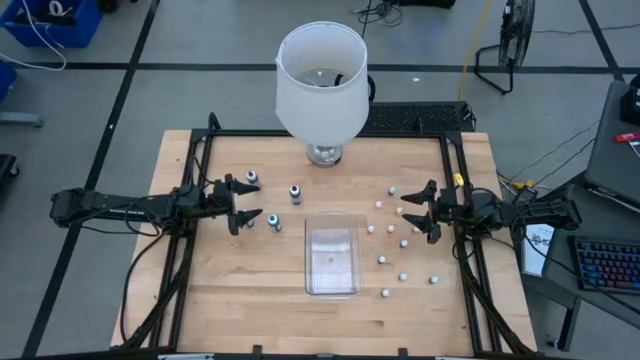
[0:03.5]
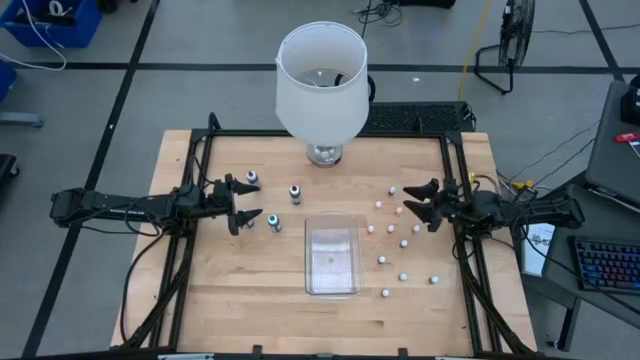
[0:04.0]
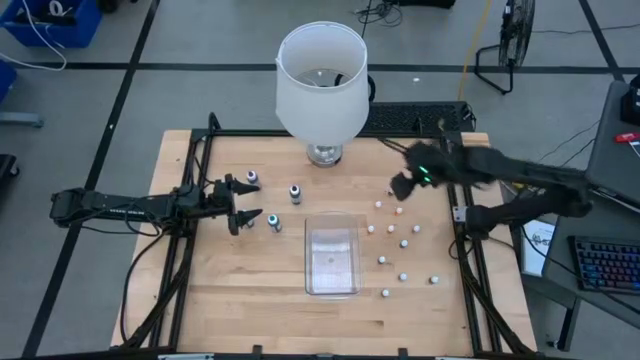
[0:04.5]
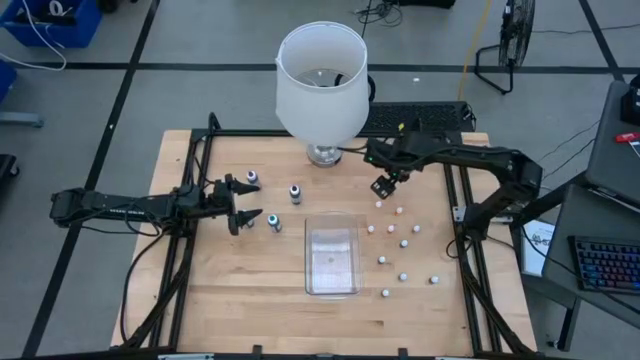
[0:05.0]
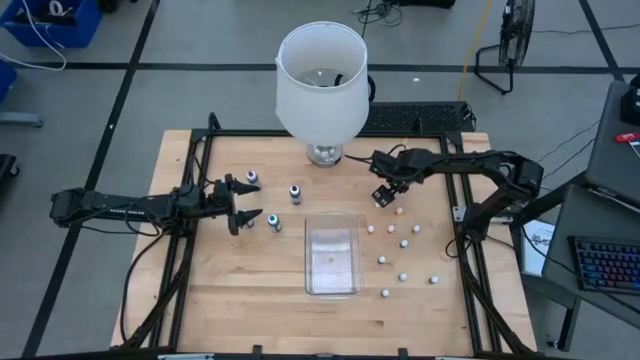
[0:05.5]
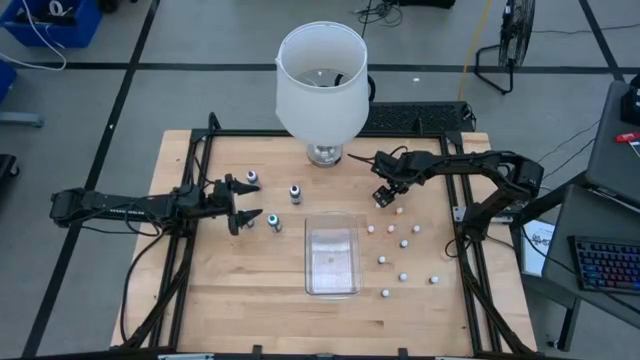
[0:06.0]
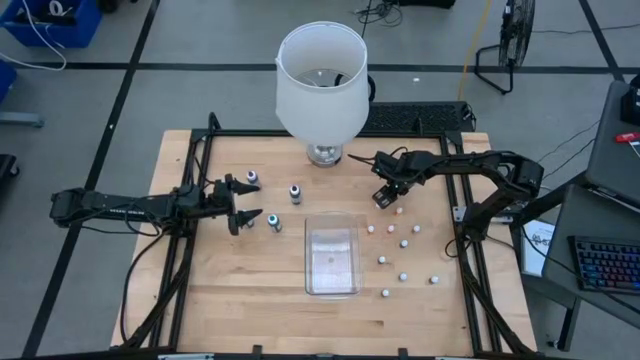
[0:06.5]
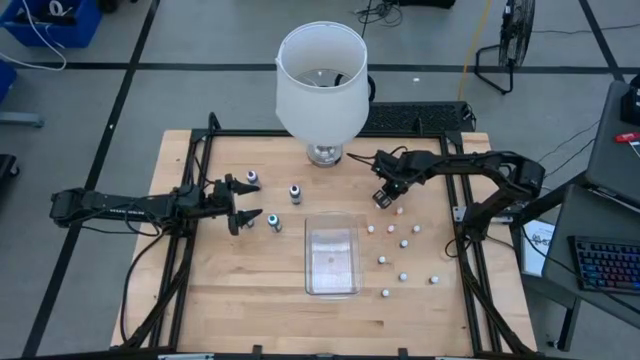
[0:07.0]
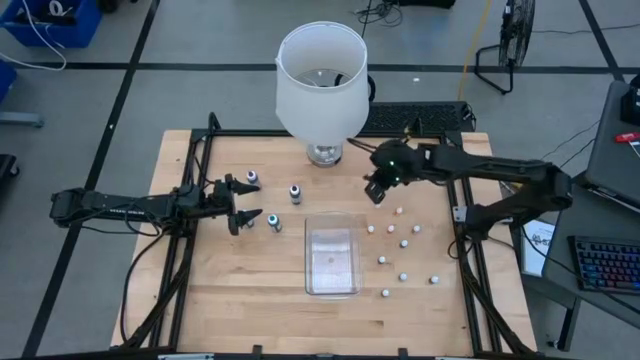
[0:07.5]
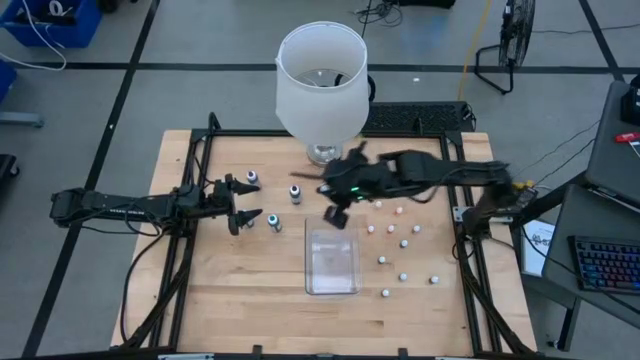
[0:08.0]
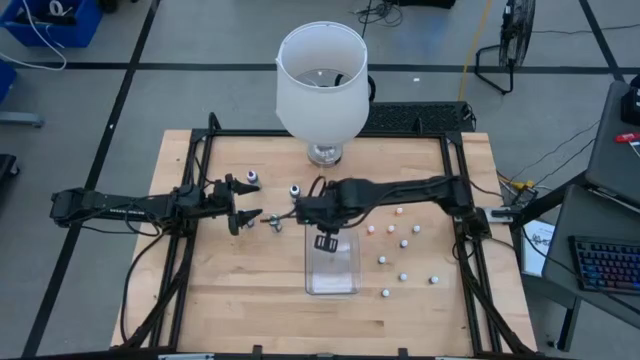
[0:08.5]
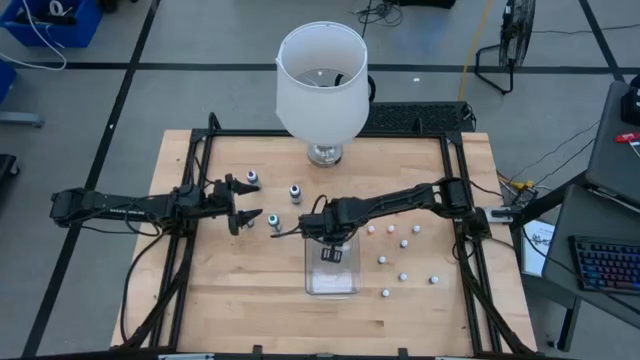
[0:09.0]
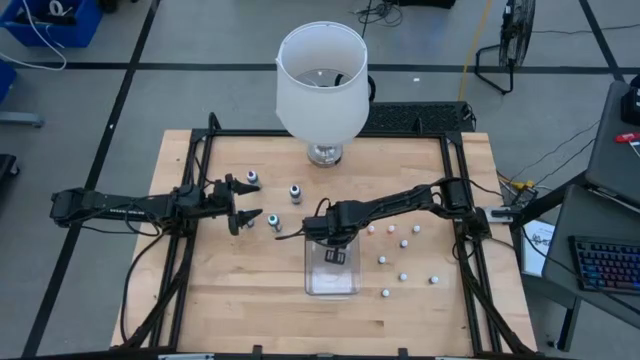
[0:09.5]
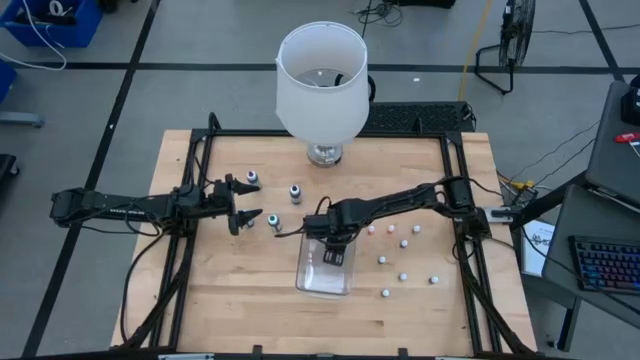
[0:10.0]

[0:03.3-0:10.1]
Task: Pick & Place food coloring
Put the green food coloring bottle into the bin

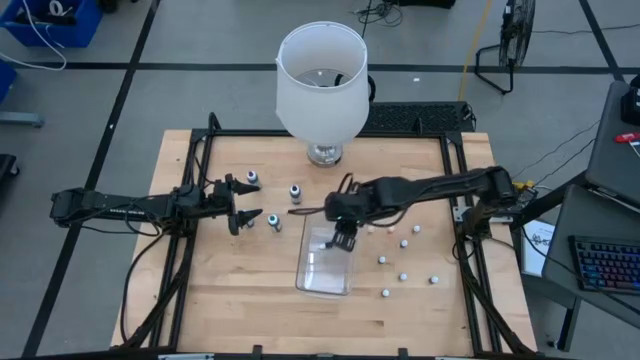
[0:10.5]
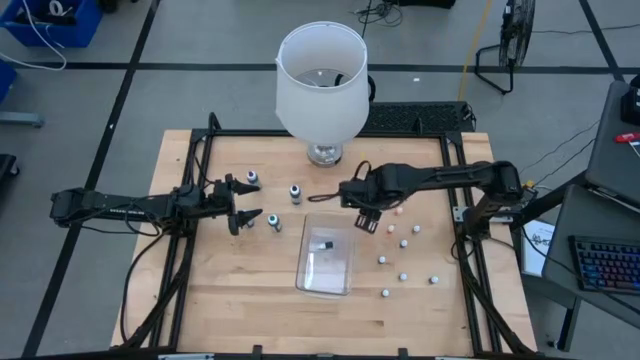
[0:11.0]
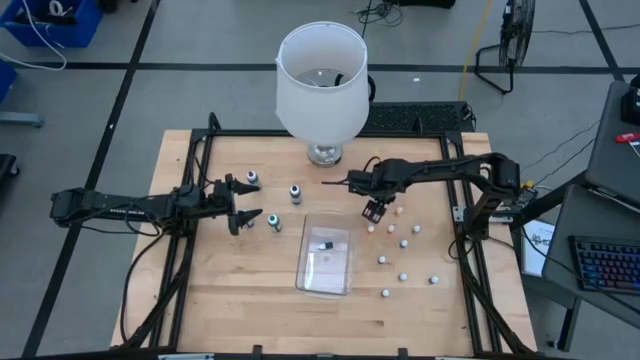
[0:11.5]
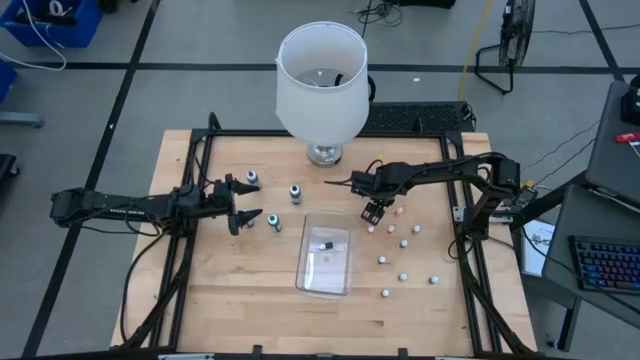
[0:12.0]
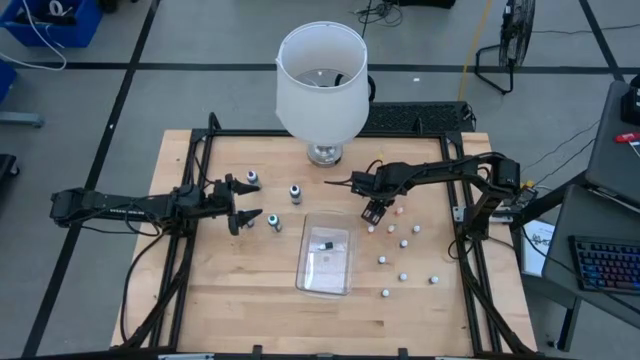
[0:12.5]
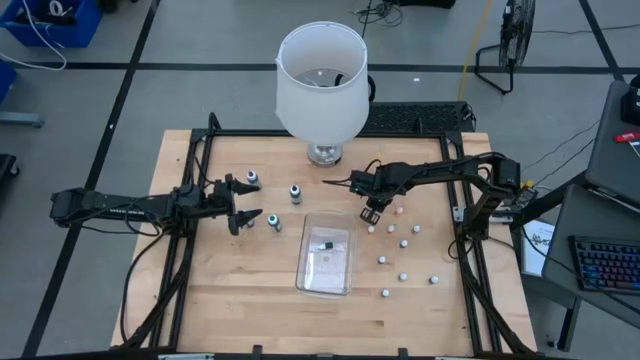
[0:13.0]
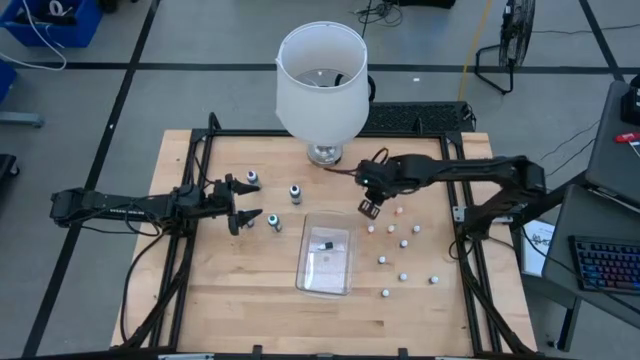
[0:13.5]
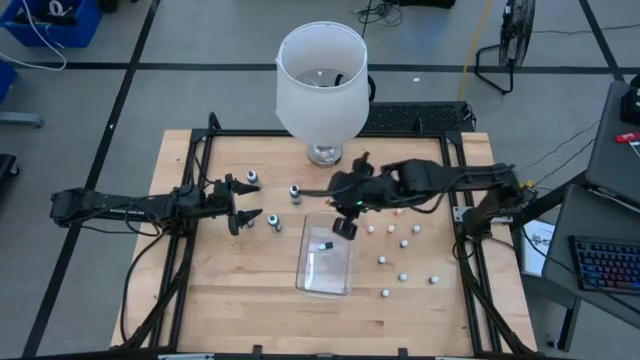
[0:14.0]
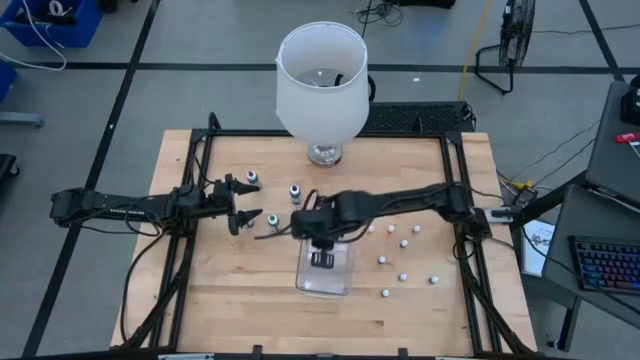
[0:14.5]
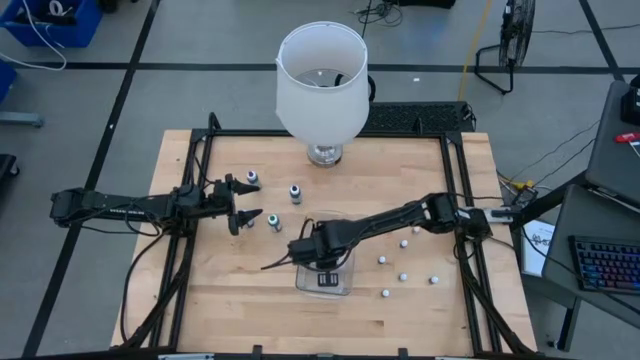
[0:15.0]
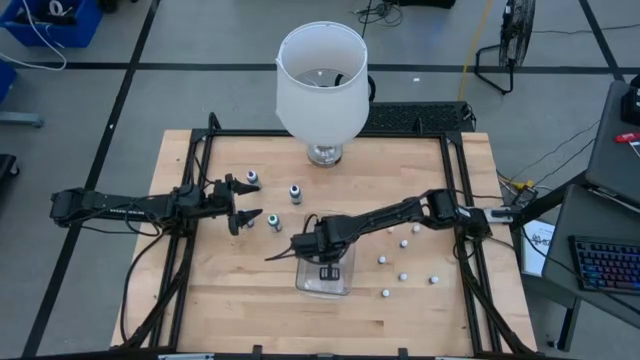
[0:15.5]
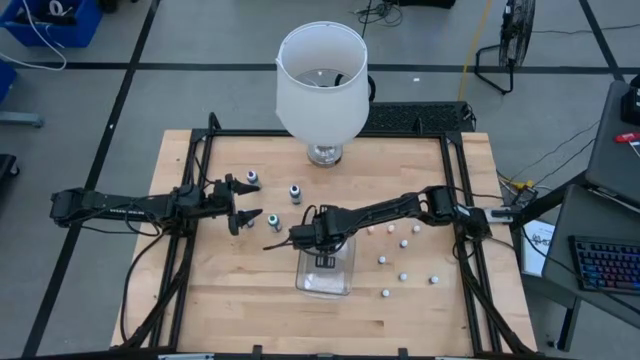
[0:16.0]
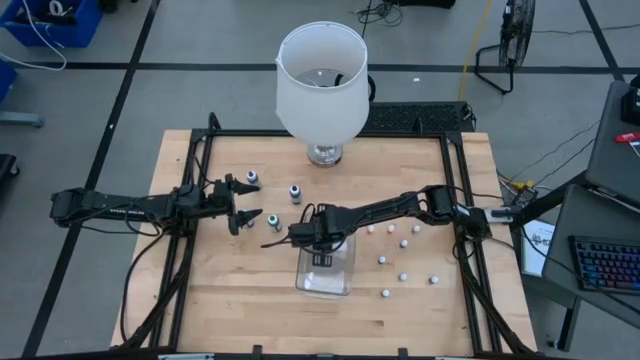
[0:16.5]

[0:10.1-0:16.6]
Put the orange food coloring bottle into the bin

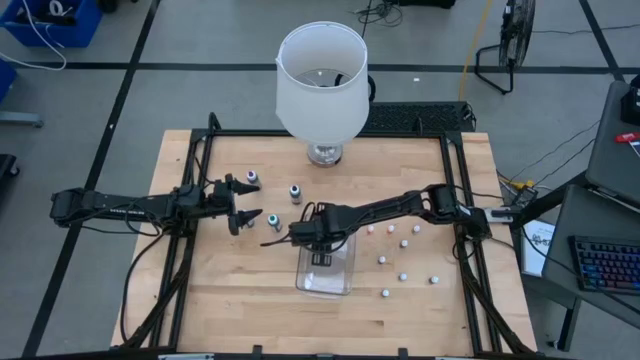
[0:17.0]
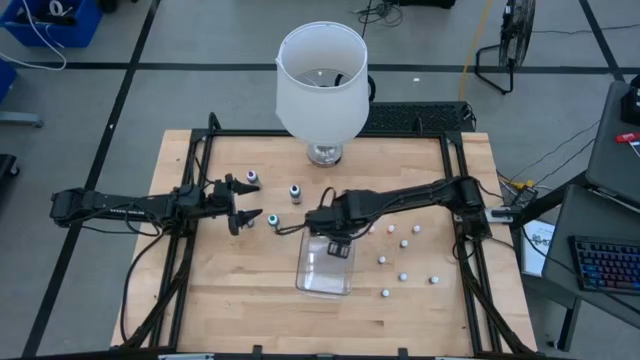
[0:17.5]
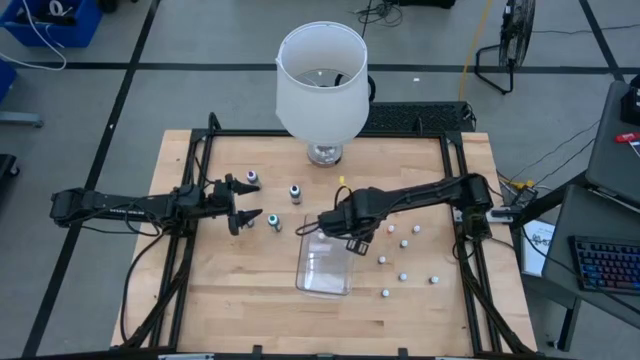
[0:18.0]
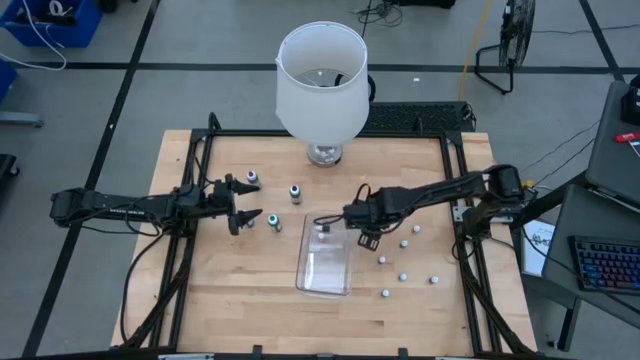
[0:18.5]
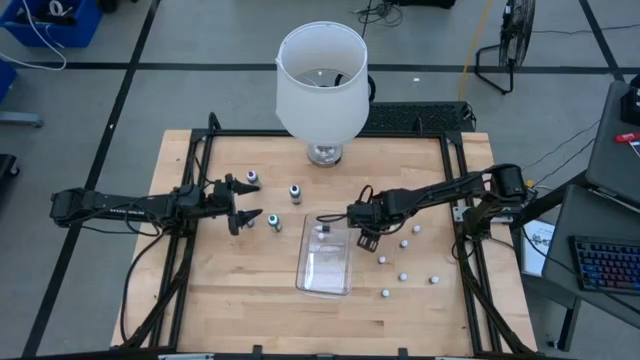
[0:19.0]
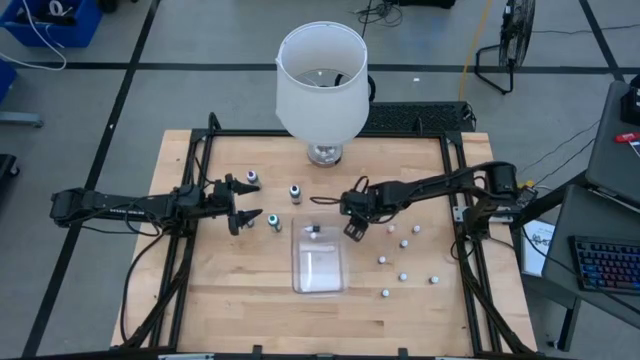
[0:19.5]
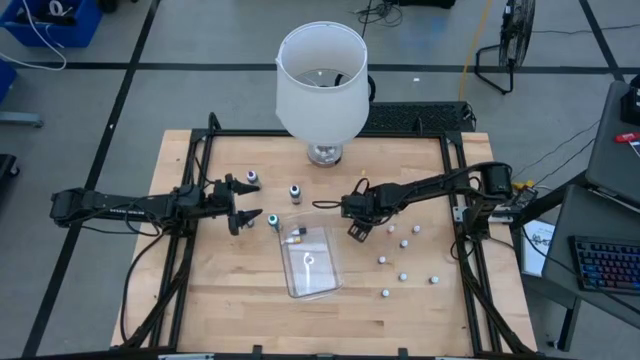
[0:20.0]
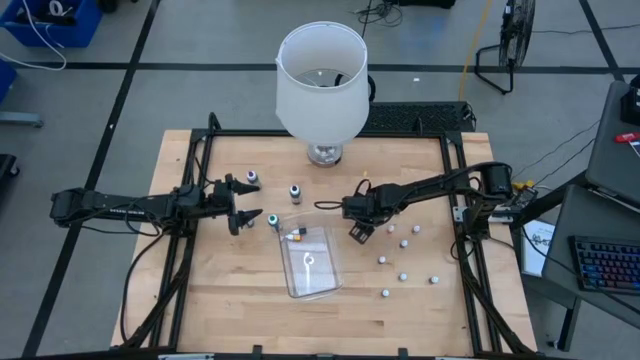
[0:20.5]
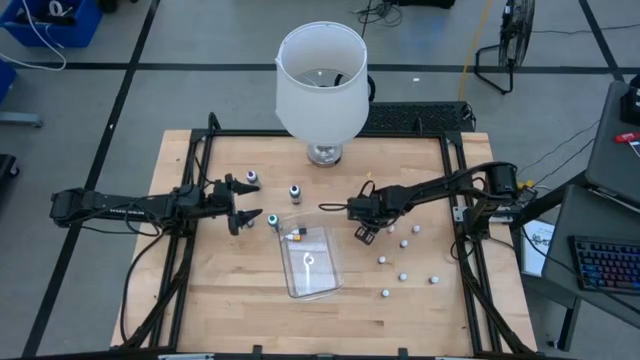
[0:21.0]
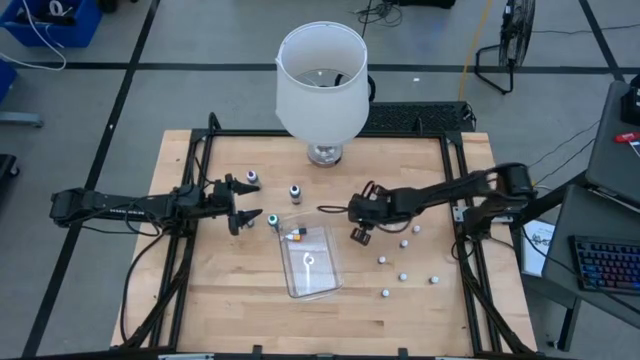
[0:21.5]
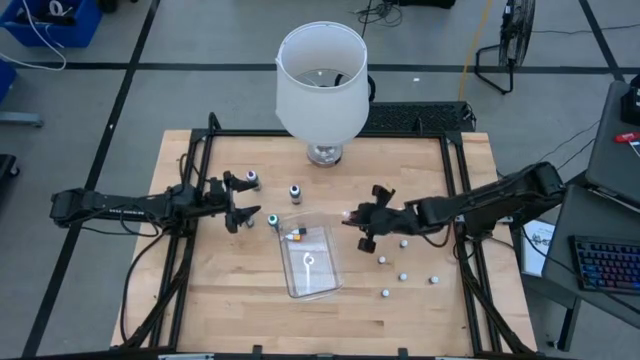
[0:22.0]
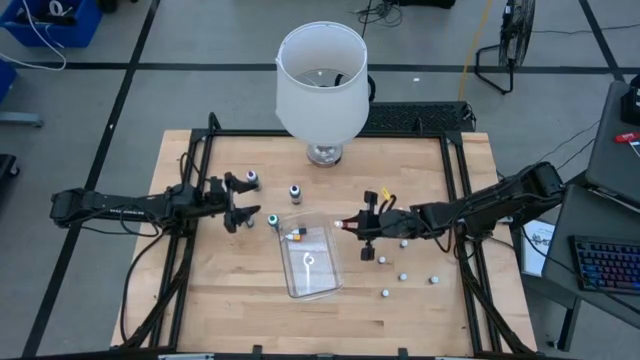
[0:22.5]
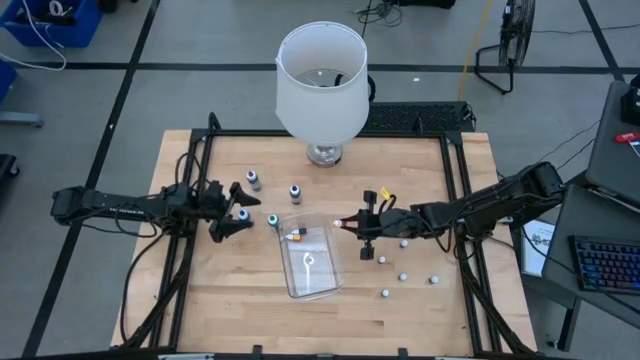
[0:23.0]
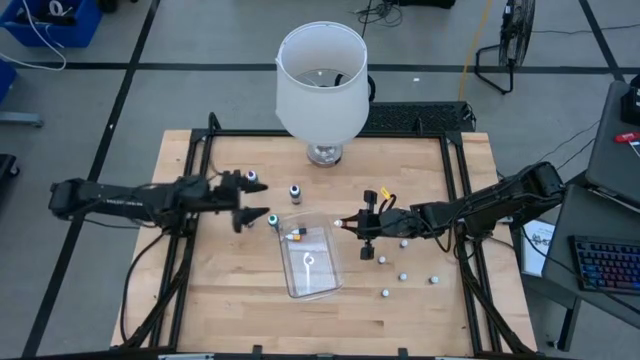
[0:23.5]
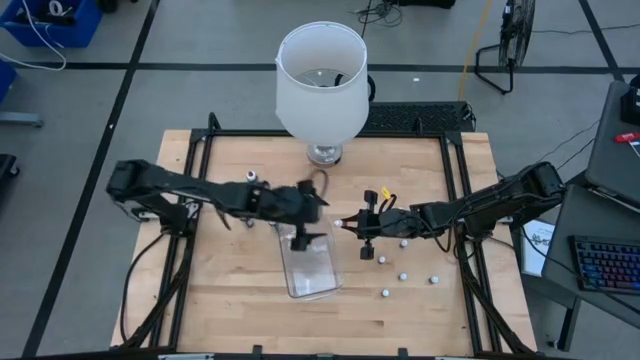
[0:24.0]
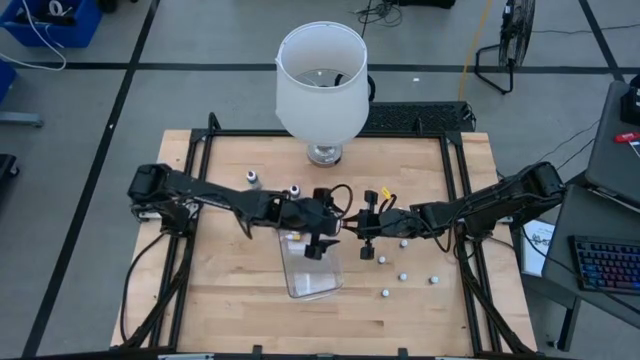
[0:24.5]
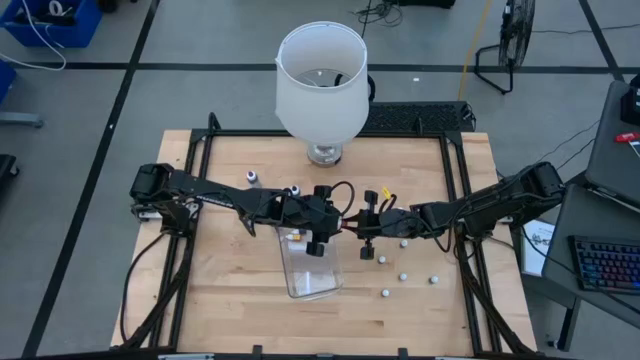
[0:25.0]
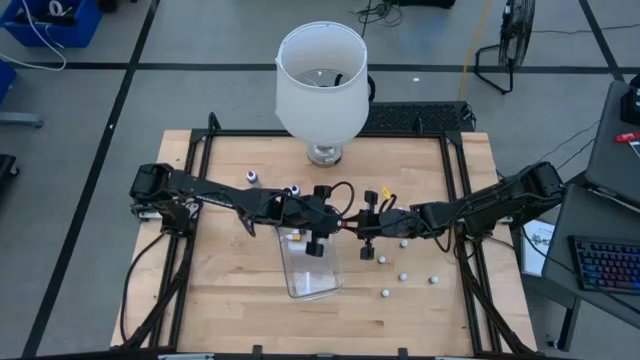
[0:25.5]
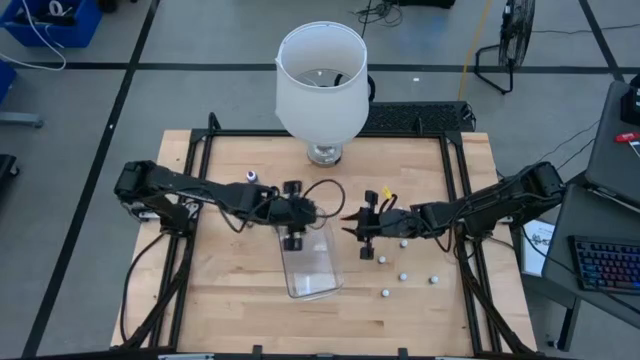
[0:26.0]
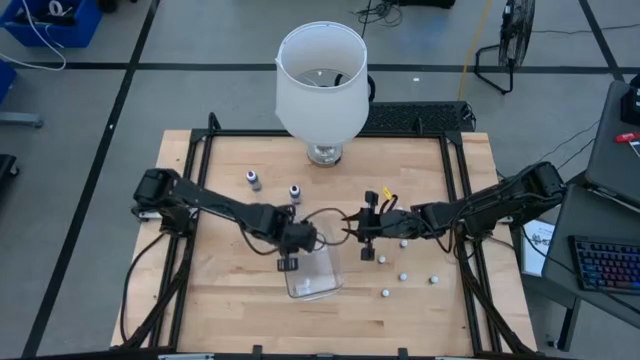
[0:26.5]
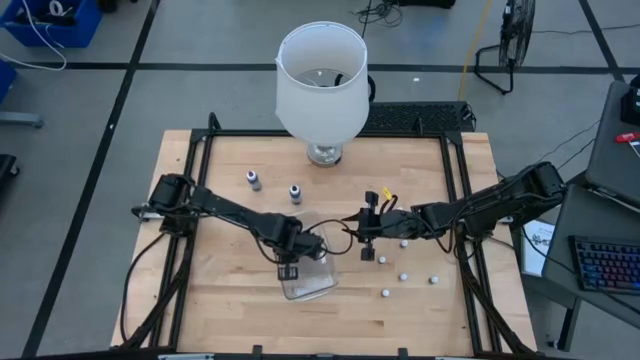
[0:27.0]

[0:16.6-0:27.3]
Put the orange food coloring bottle into the bin
